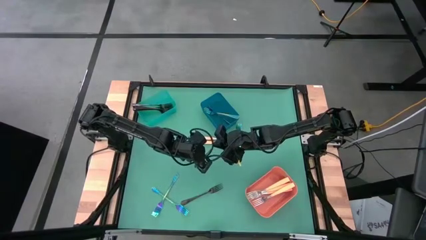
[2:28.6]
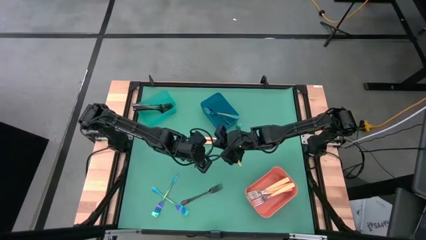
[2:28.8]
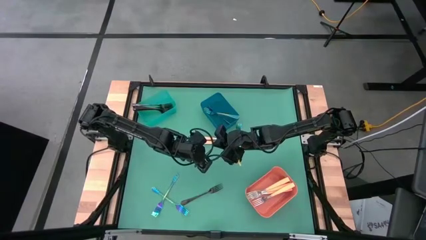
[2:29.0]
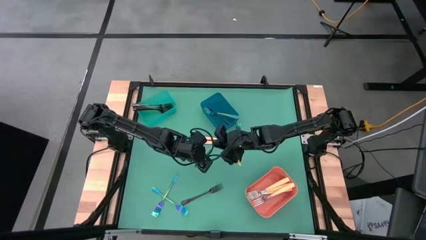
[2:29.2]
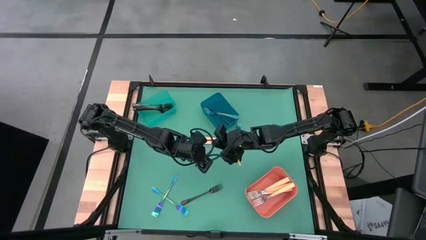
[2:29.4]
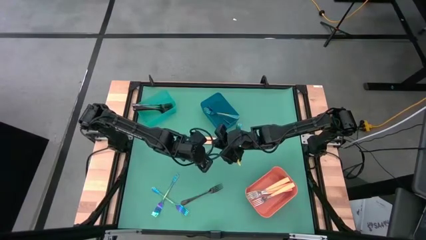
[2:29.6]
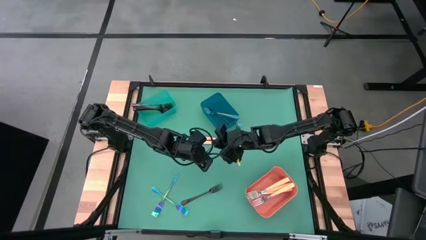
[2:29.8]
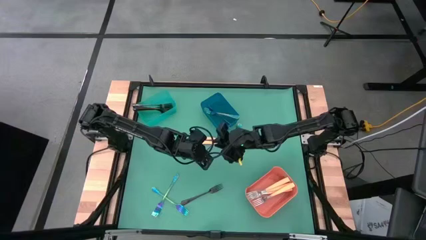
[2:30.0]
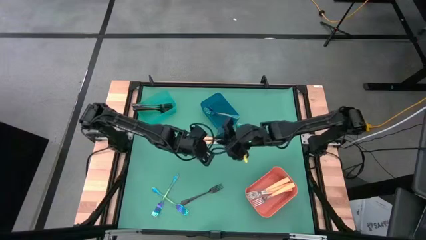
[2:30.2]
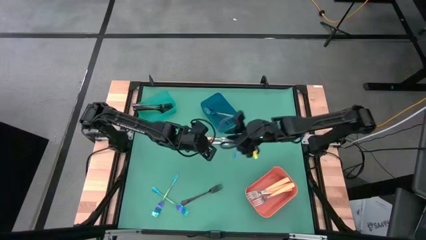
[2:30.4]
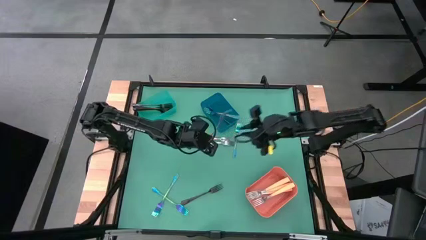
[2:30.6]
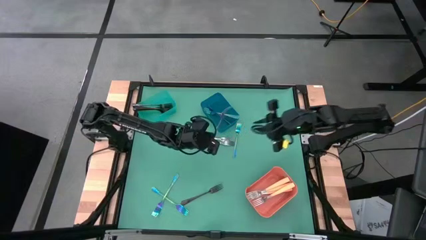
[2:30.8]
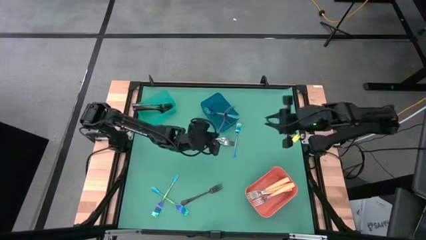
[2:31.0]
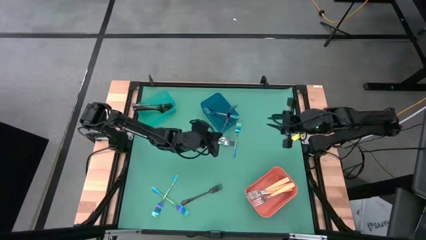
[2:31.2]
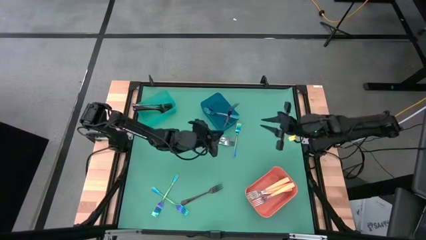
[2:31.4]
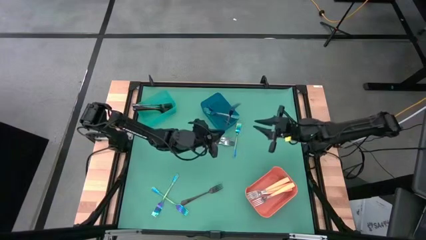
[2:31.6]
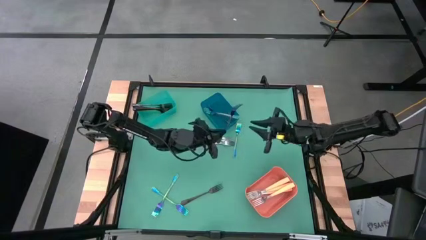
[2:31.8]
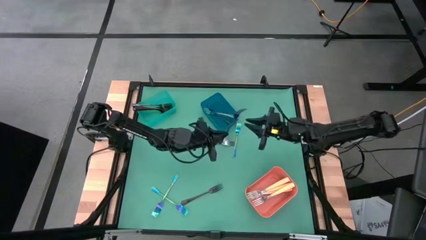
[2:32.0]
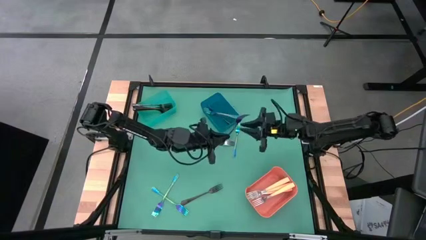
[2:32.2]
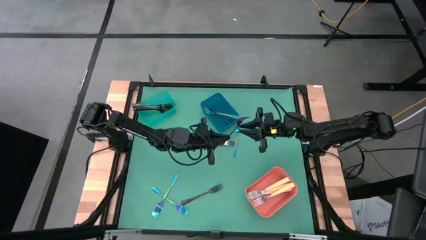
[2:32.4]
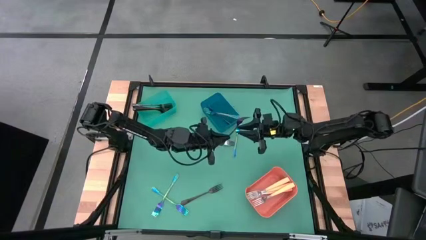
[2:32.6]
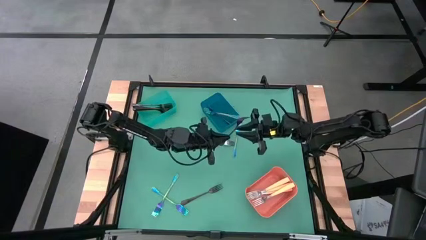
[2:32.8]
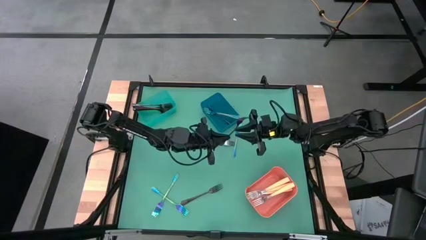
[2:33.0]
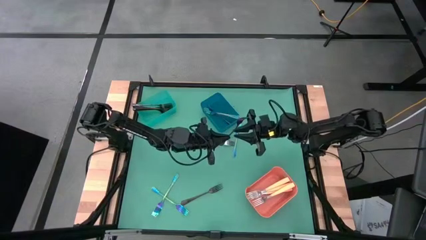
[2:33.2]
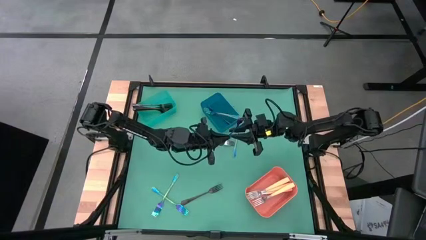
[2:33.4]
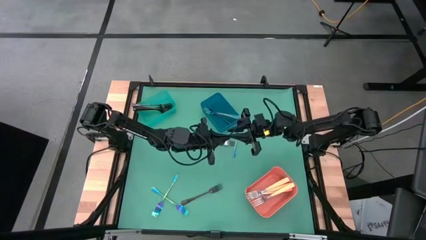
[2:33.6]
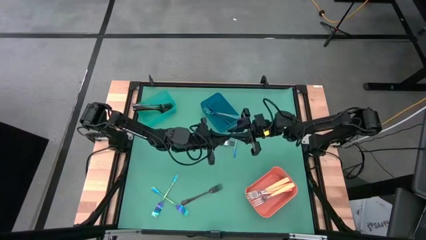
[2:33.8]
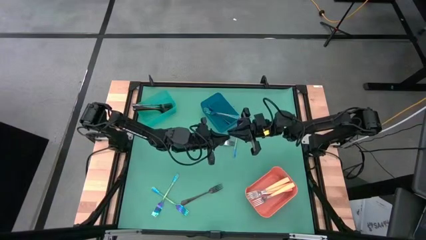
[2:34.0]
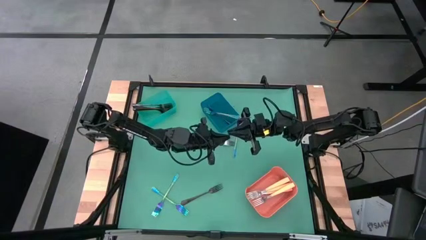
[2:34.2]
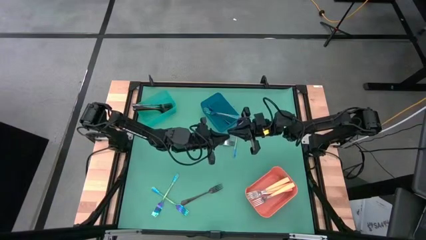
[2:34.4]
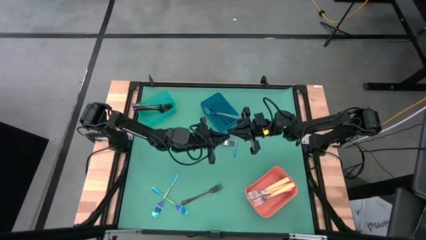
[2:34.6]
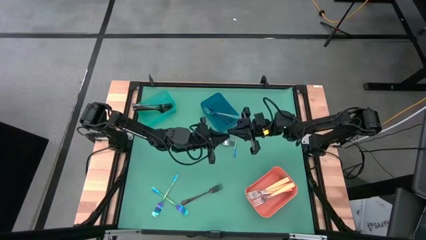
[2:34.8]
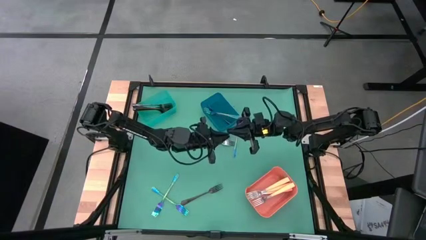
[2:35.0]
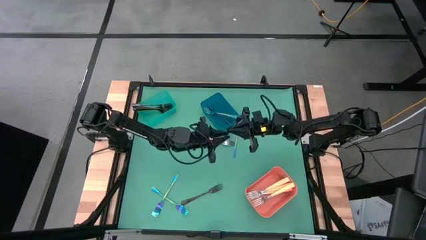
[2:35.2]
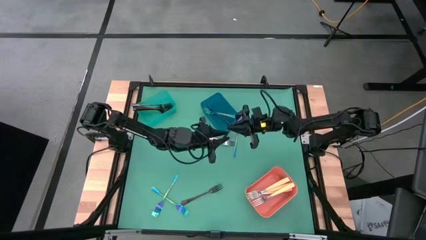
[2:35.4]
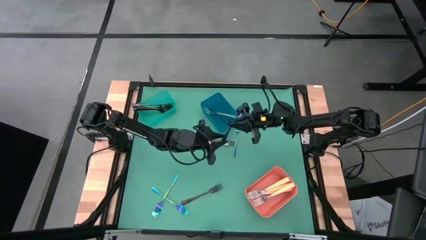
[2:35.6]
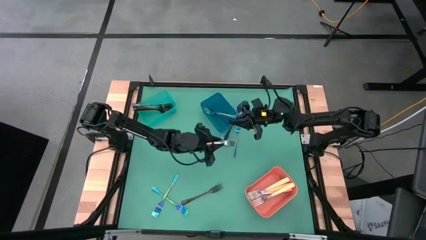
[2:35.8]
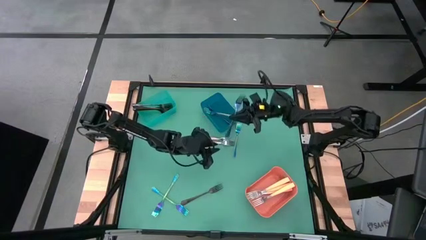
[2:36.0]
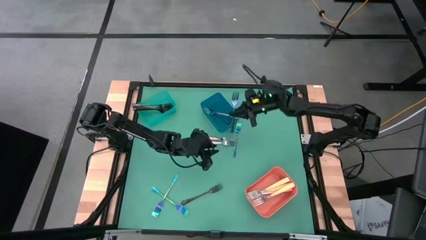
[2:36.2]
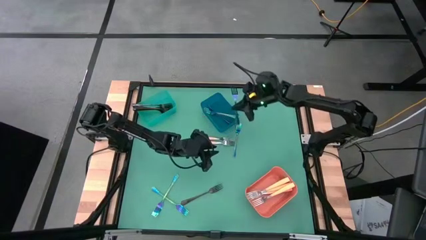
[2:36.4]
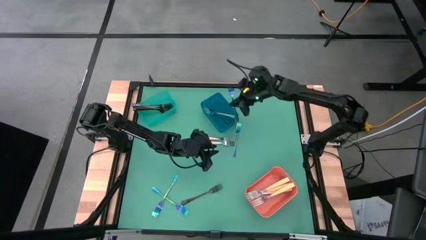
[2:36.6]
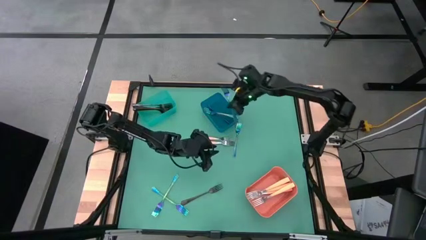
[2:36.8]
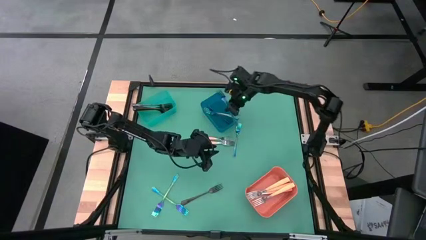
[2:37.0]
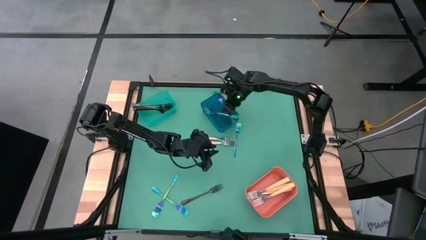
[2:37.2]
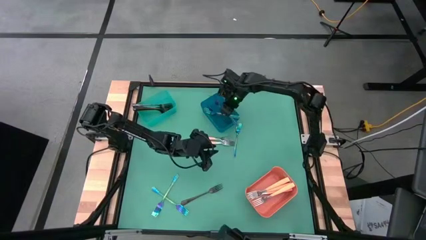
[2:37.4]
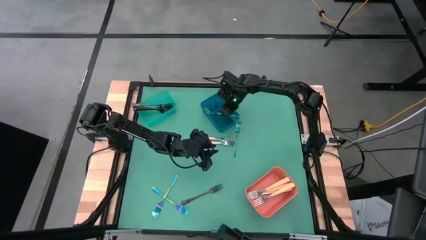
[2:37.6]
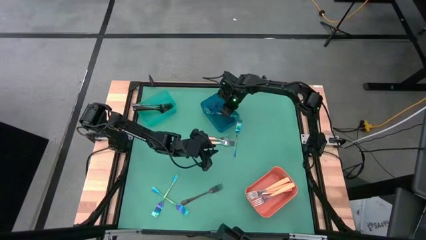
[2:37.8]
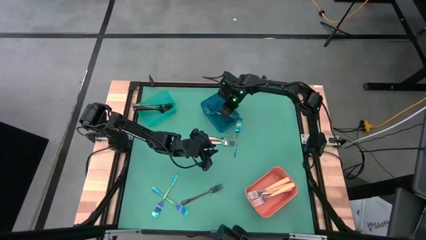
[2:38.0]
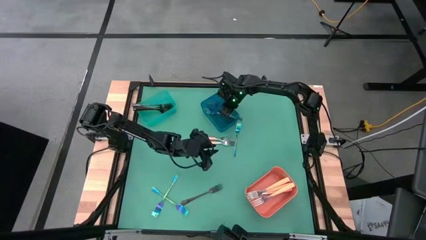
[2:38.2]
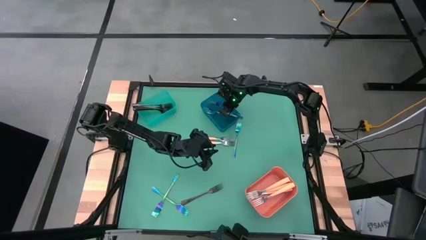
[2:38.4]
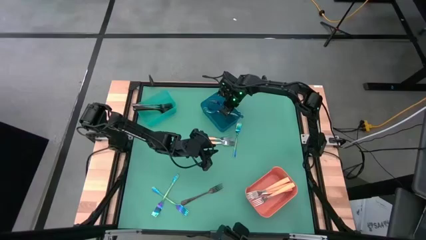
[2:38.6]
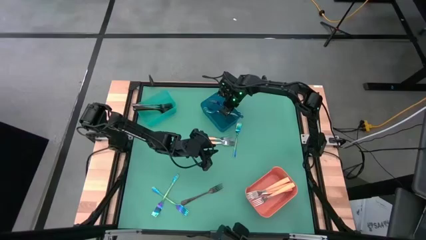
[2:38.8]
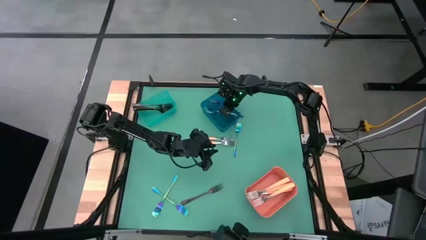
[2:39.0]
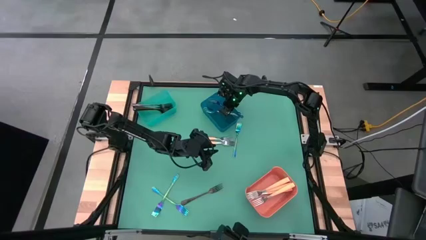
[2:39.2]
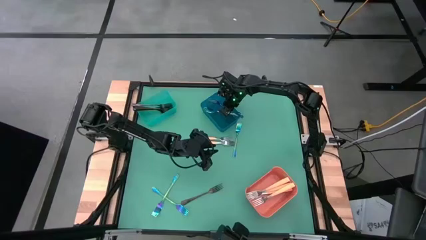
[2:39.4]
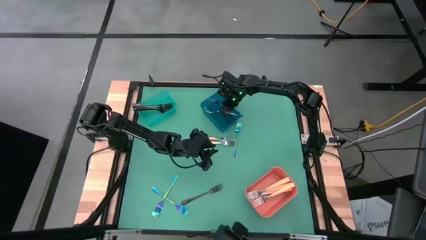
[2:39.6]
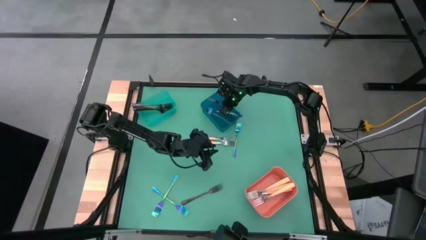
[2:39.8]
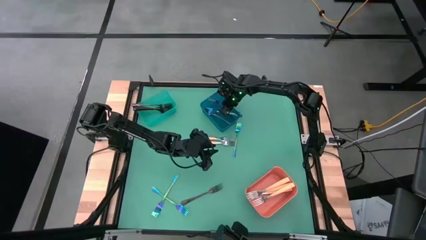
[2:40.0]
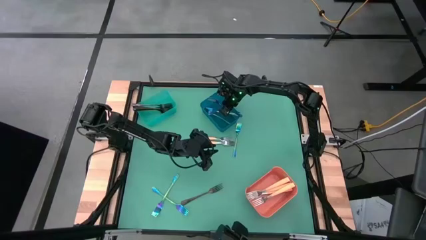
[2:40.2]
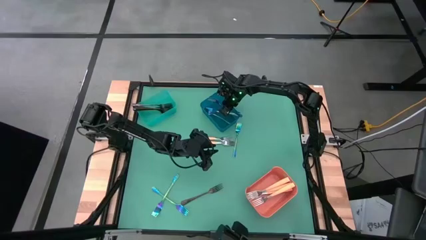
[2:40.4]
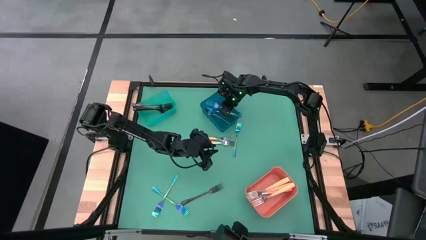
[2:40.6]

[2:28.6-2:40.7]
Task: Sort silverware by color (type)
Put the purple fork into the blue bin

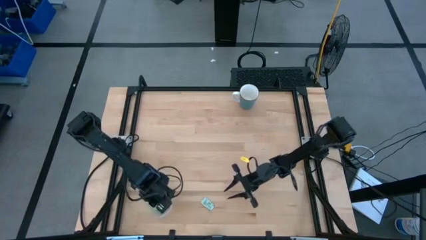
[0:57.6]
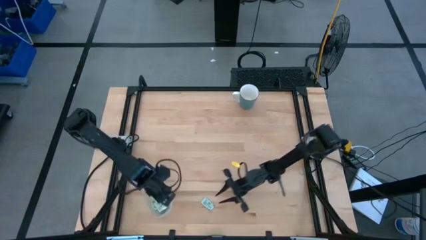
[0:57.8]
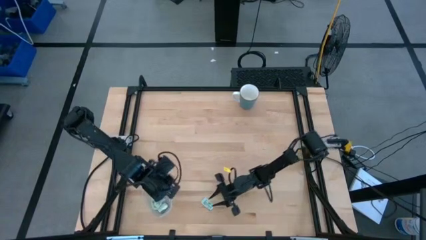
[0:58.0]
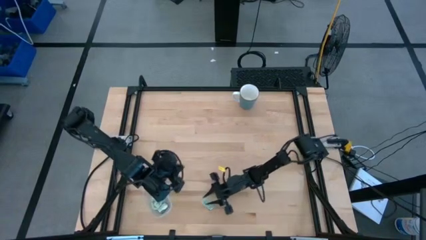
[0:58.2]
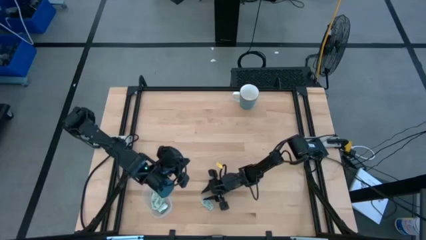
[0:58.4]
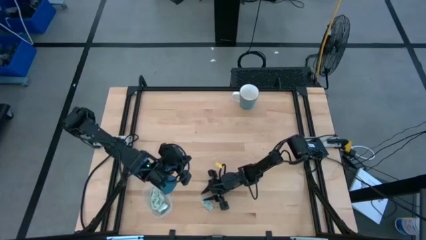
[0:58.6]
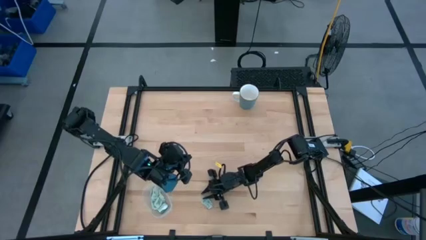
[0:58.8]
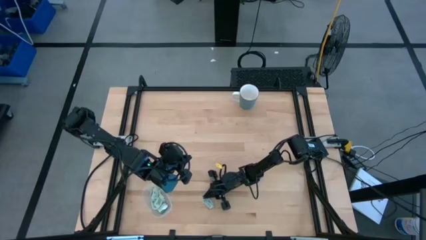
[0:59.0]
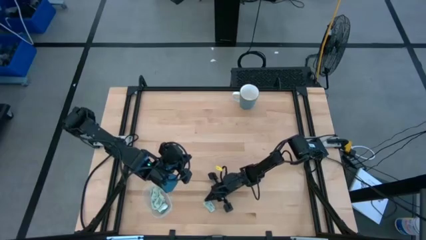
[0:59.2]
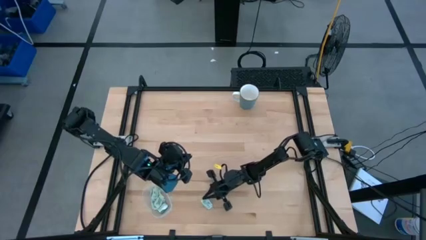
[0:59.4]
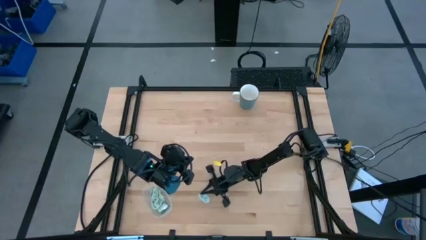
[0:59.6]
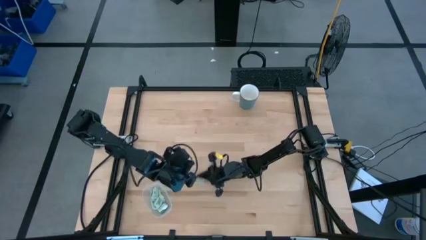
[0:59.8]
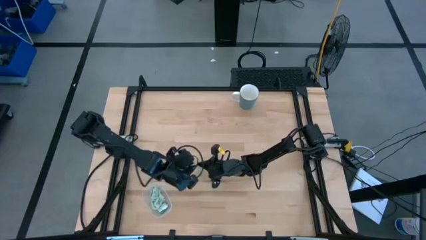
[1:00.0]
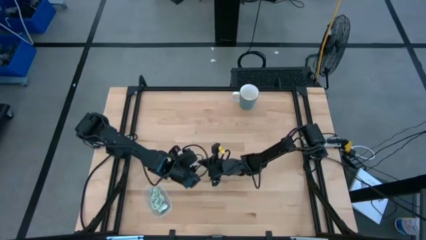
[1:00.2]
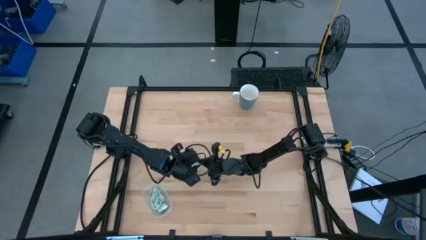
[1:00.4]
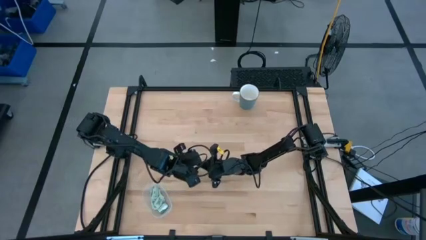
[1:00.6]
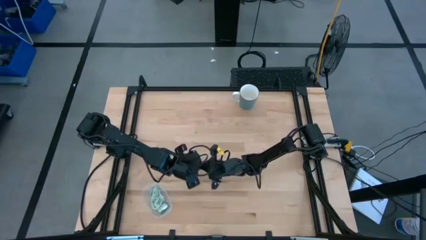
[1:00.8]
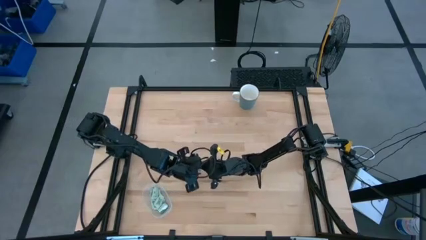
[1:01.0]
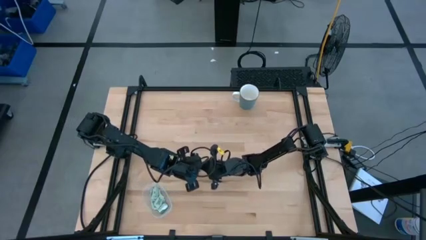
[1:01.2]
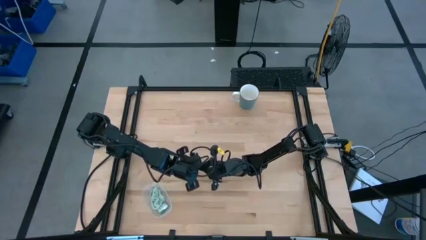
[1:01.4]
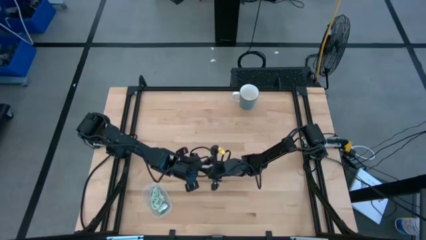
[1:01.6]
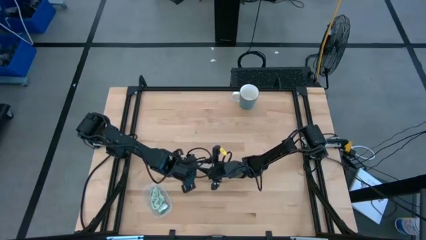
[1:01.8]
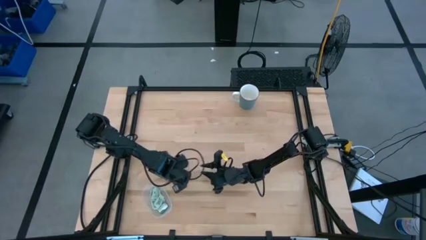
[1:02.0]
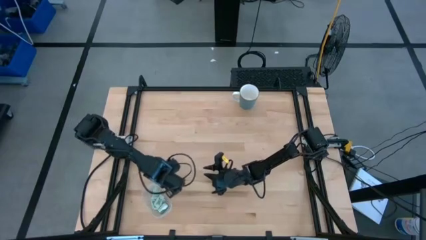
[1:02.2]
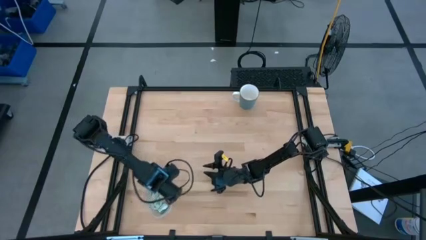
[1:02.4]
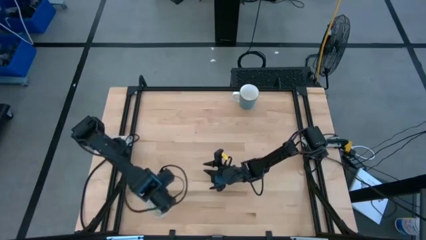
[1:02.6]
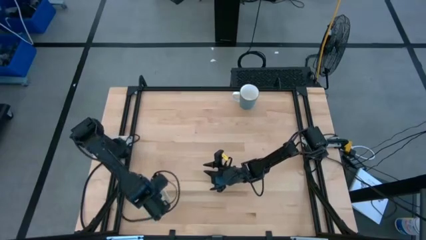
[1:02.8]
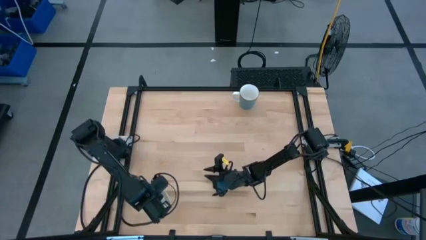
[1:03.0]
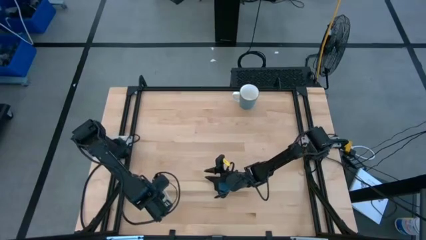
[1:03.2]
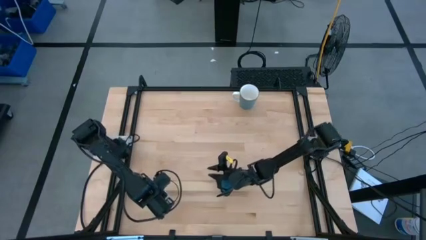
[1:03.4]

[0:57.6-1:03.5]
Task: Pick and place Stevia / Truvia into bins
Put the stevia packet into the transparent container
